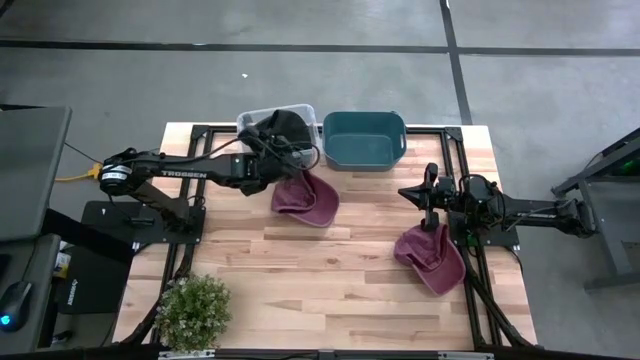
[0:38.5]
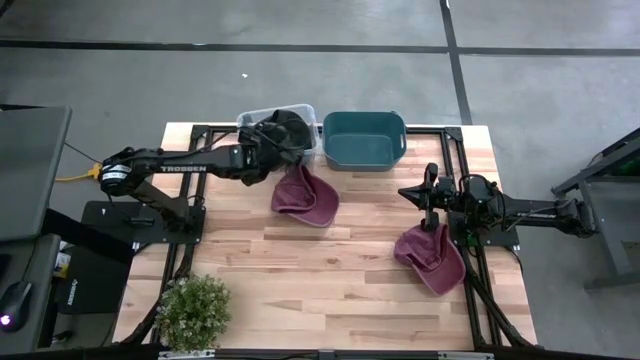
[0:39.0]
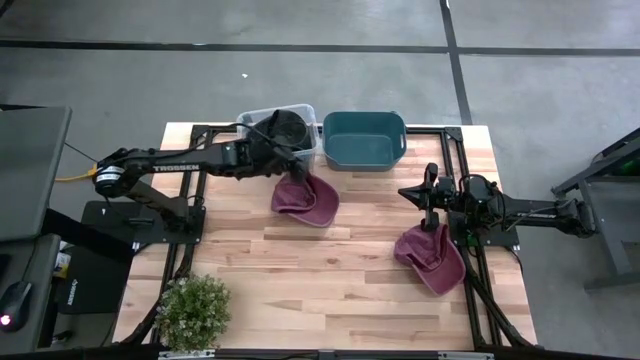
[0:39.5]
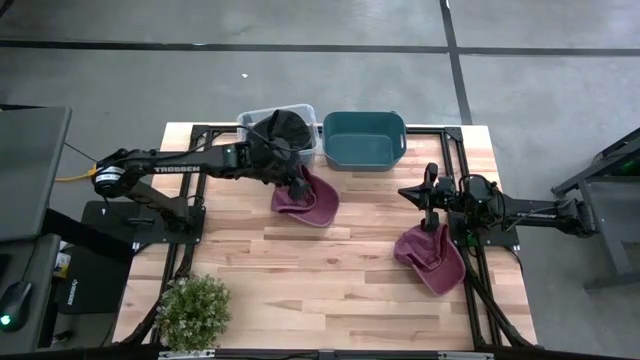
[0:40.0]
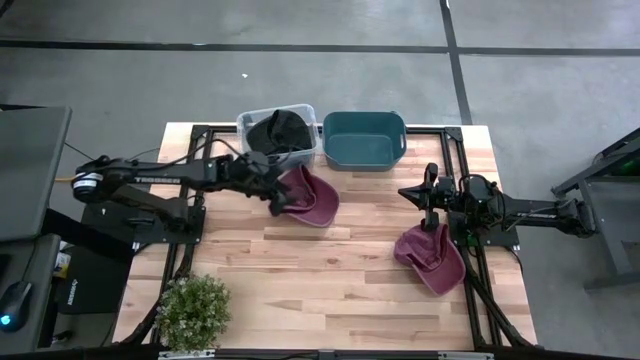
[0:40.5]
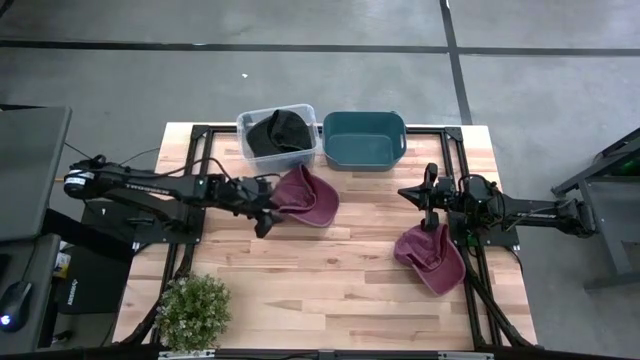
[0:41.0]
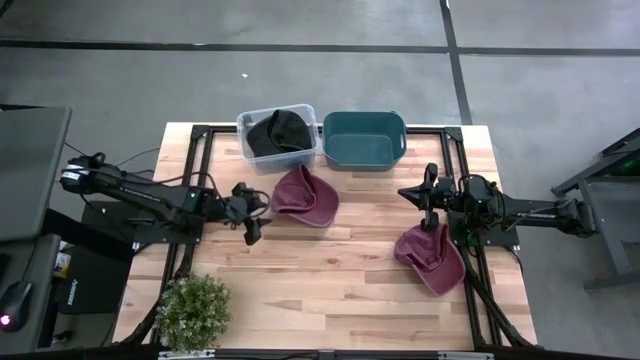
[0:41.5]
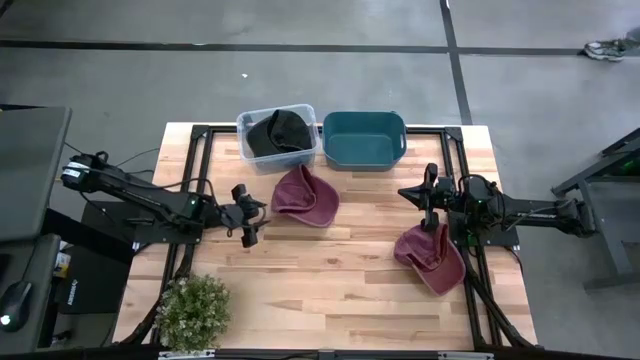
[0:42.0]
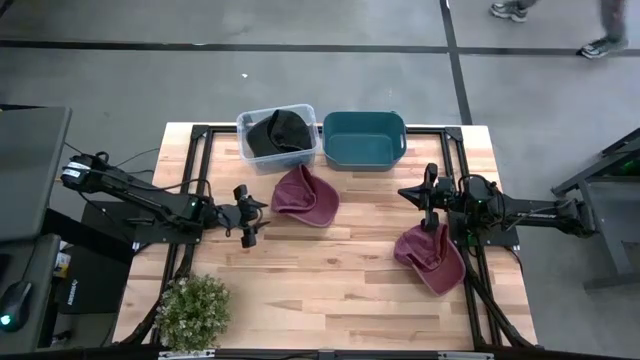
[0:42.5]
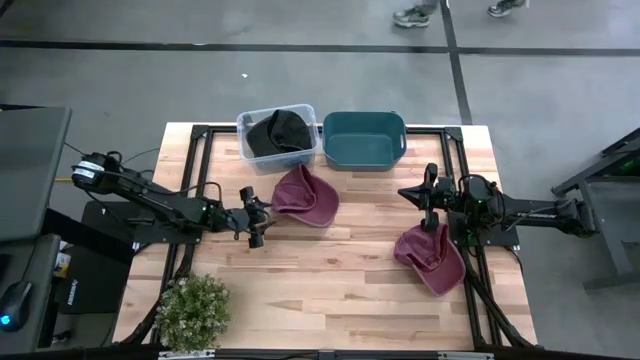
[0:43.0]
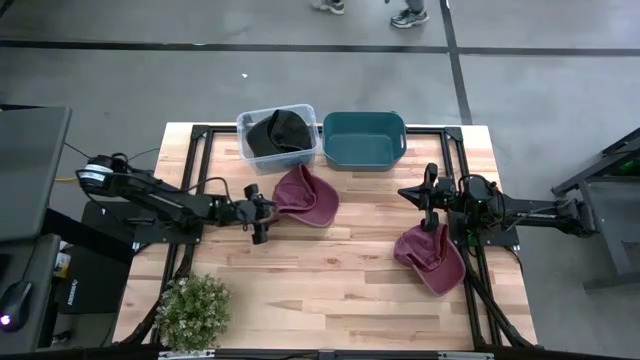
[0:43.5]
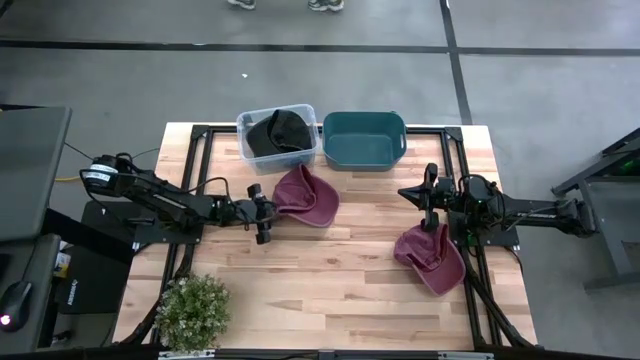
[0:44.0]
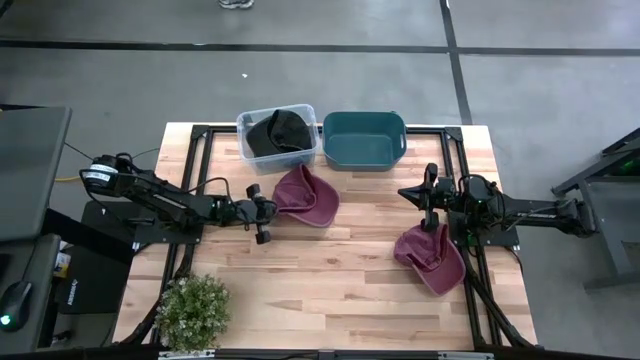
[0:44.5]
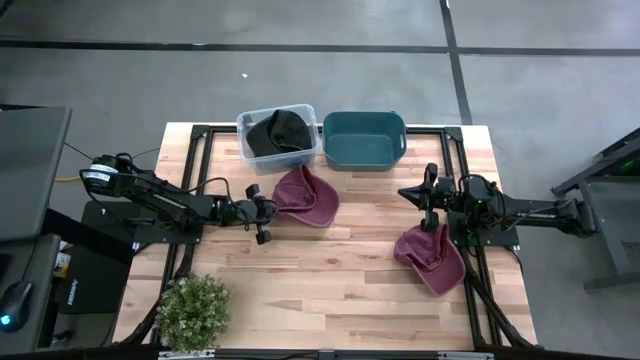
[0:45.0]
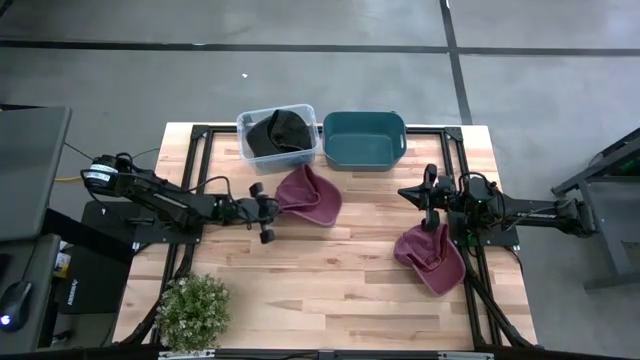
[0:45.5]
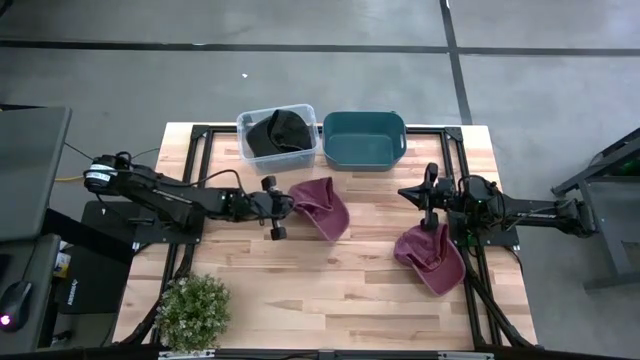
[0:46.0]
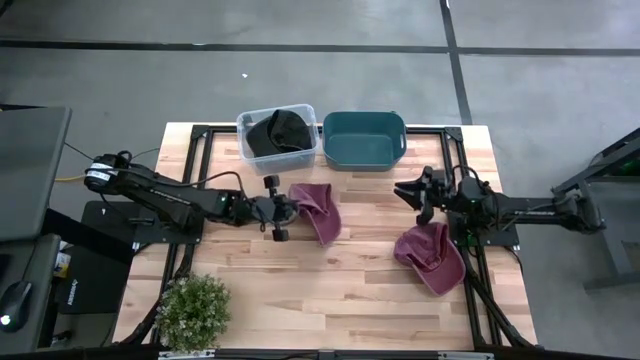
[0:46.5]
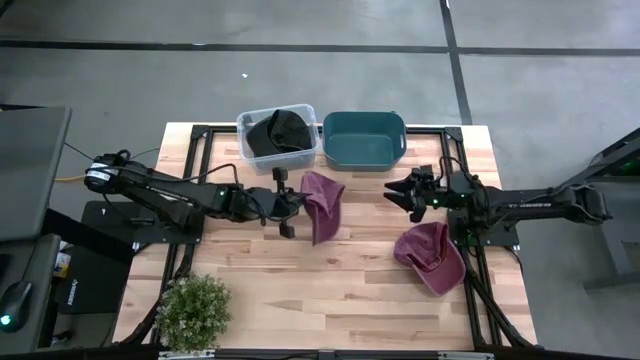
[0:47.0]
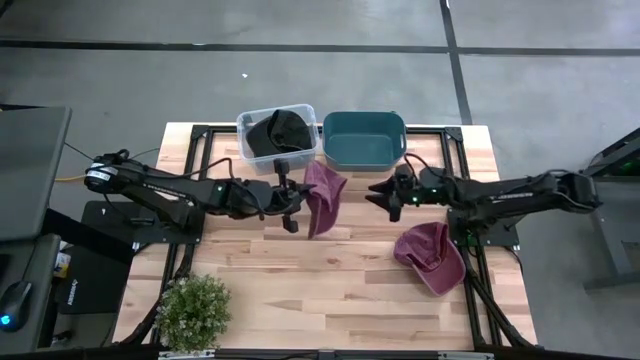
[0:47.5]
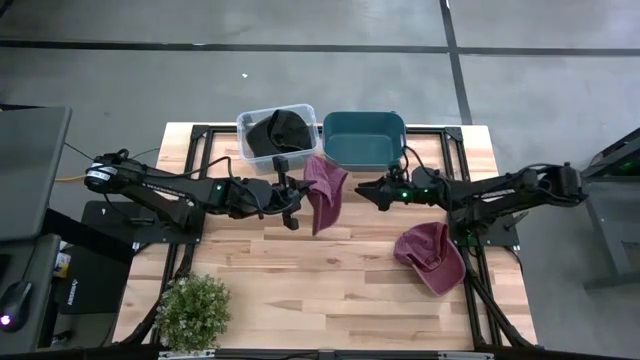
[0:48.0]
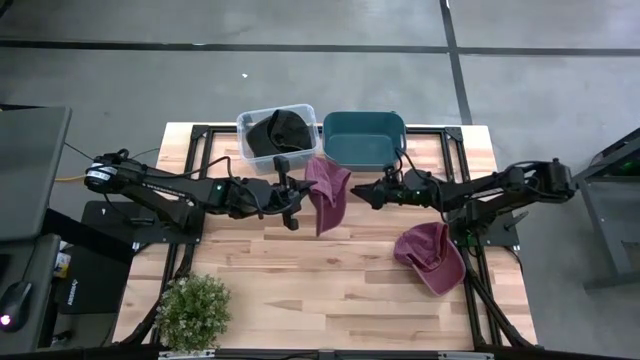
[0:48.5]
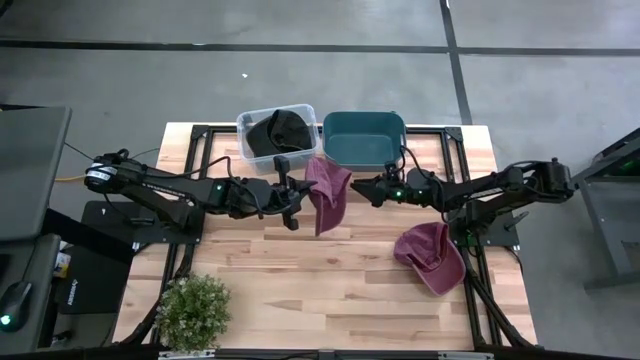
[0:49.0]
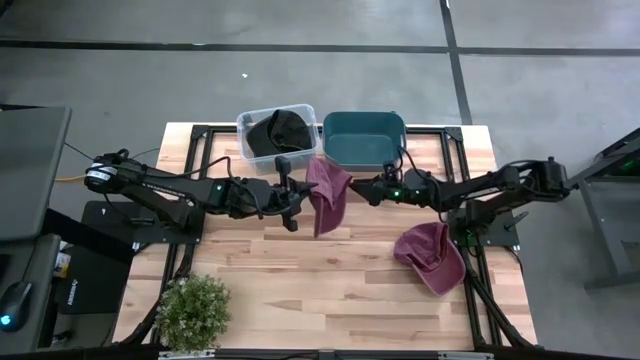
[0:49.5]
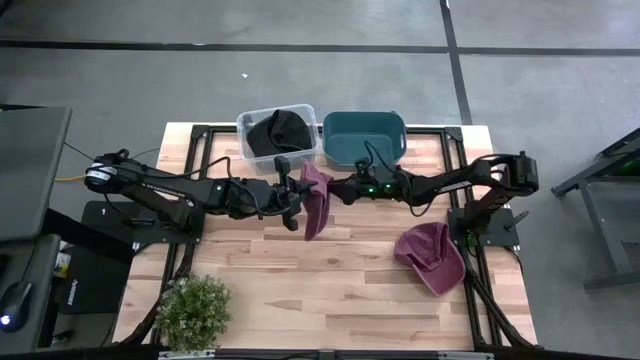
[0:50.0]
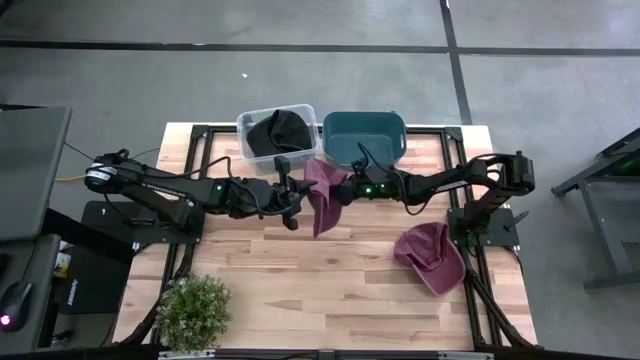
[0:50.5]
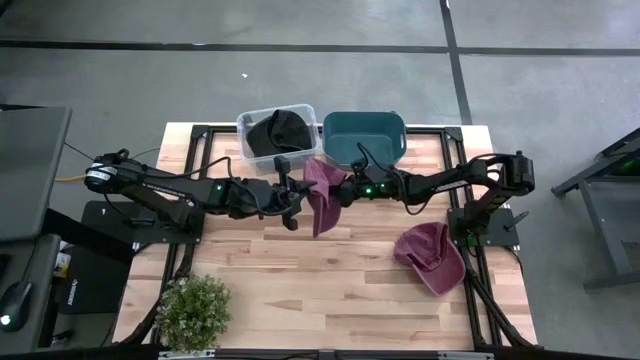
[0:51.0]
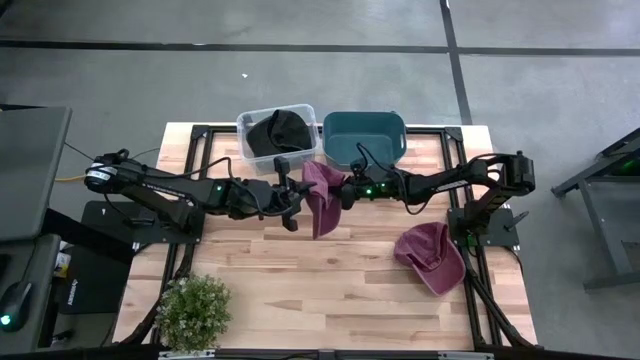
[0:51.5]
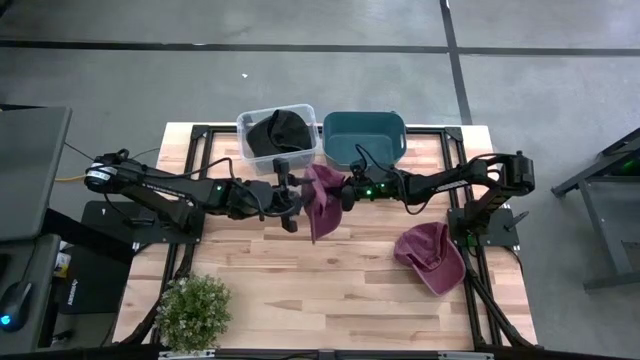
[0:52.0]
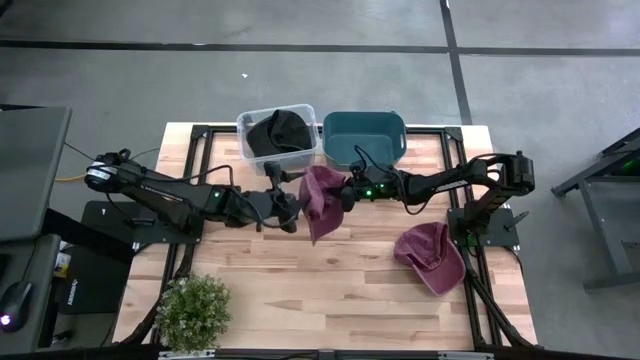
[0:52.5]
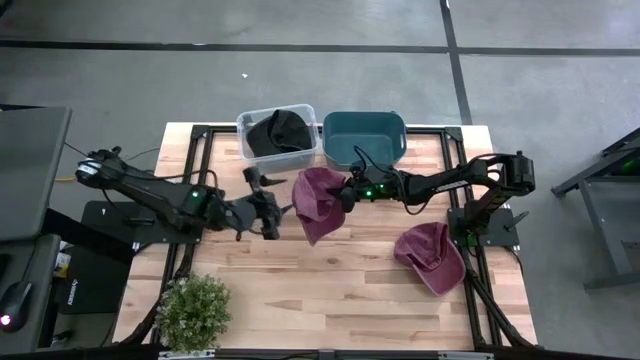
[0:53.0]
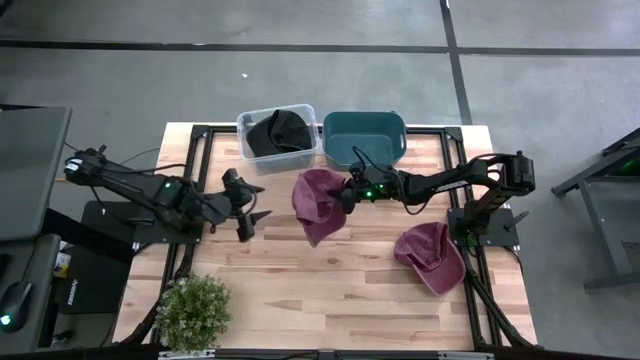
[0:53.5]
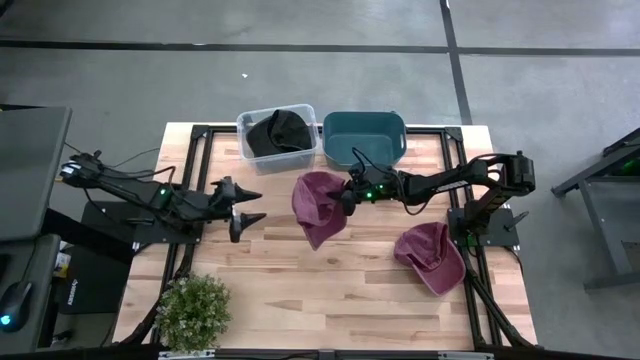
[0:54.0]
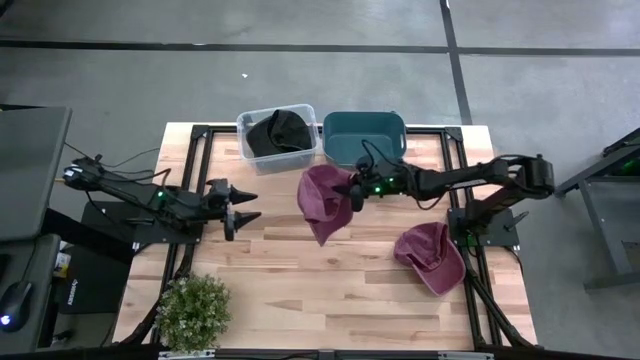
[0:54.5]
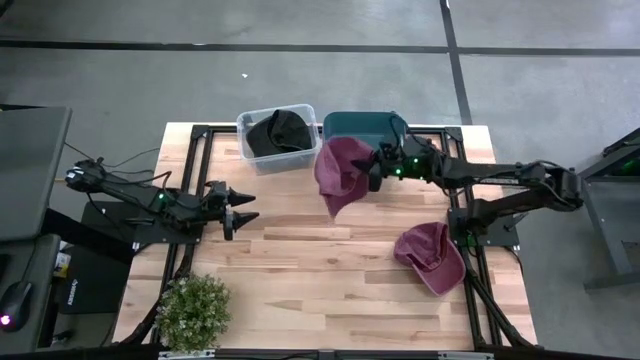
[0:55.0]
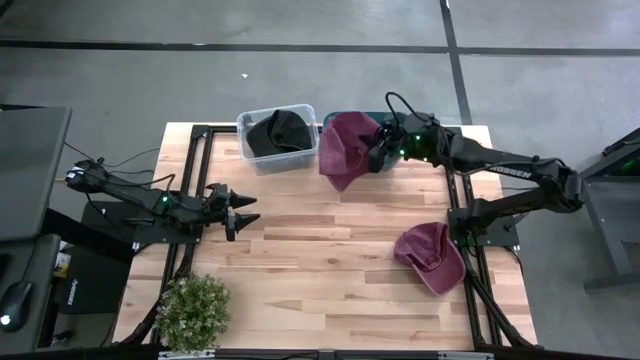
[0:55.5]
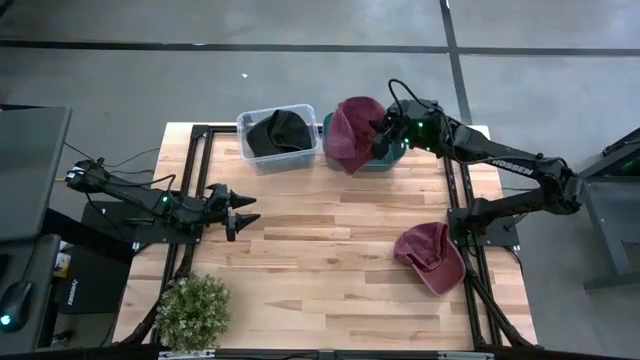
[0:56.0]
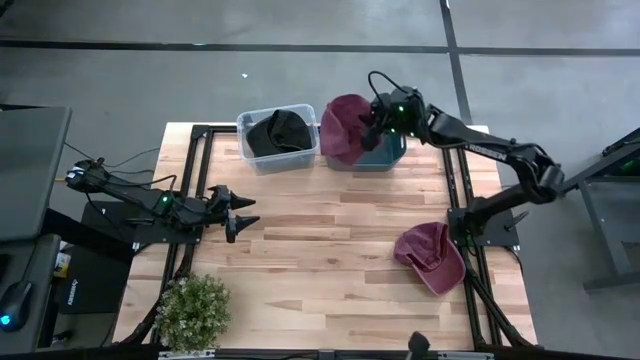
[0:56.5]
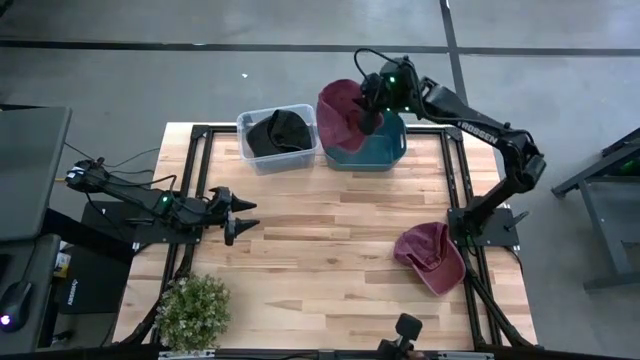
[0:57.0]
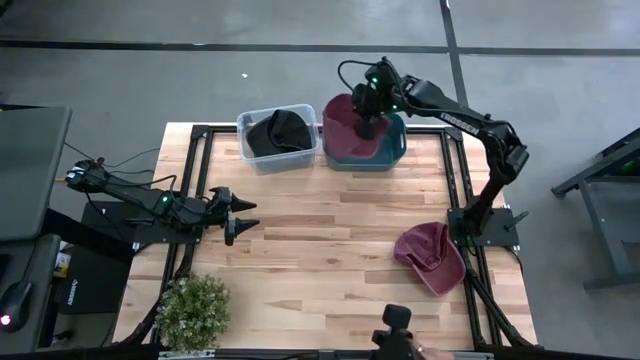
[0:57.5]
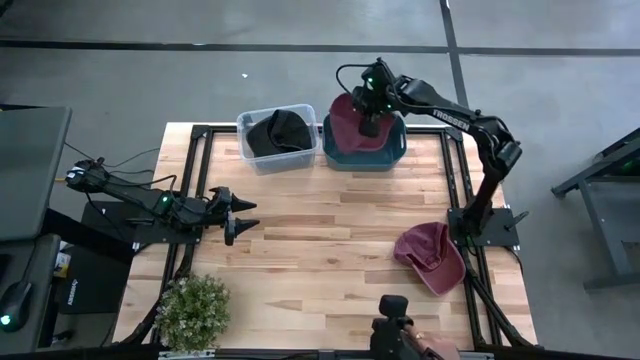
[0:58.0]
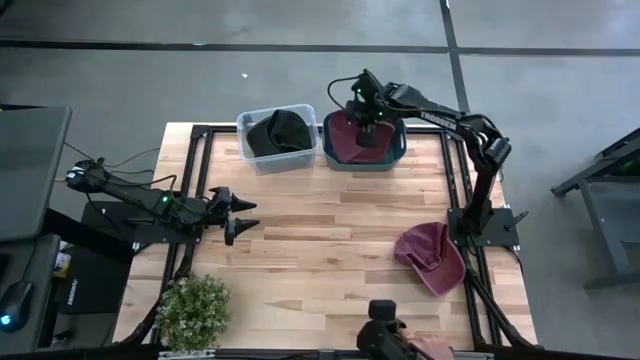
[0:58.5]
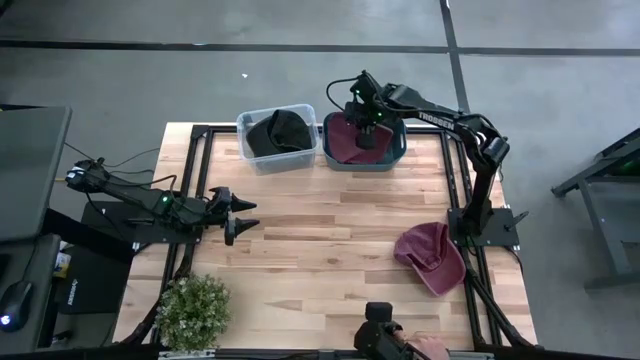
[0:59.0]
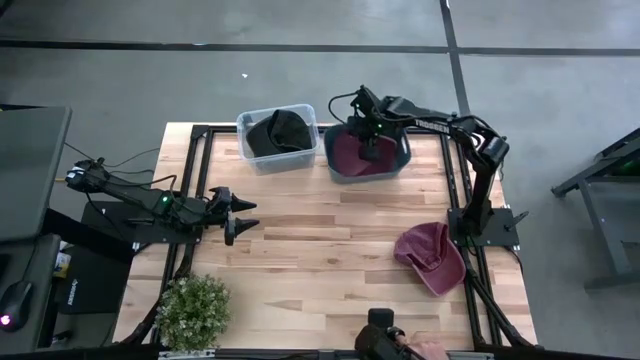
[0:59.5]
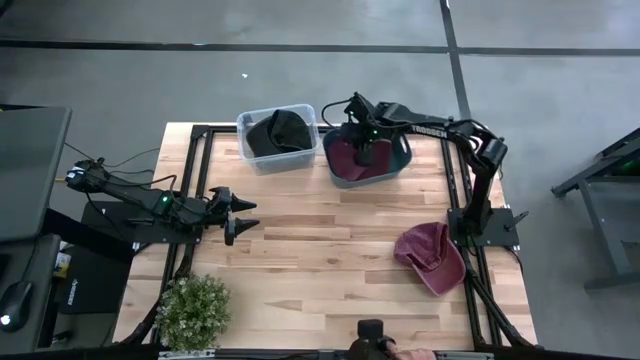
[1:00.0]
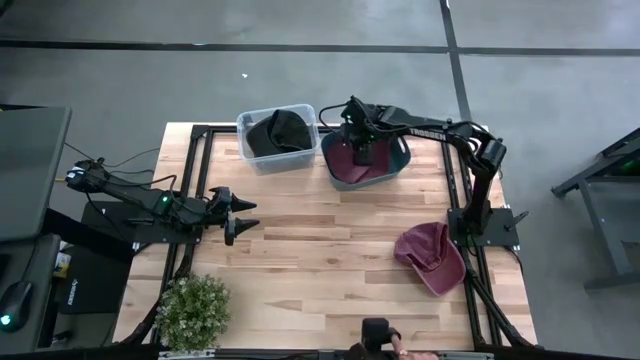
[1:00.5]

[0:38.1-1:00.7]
Task: Pick & Place hat
Put the top red cap into the blue bin
